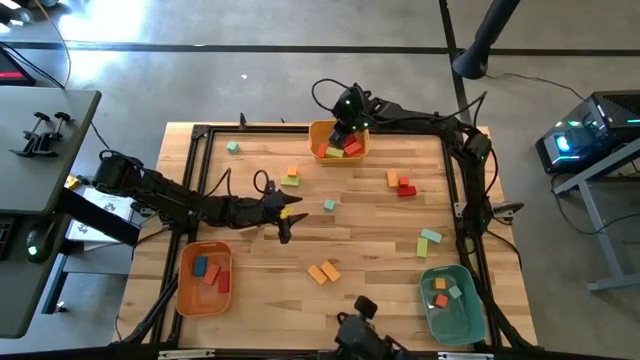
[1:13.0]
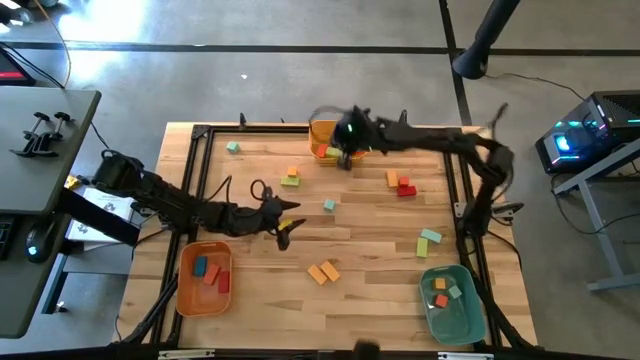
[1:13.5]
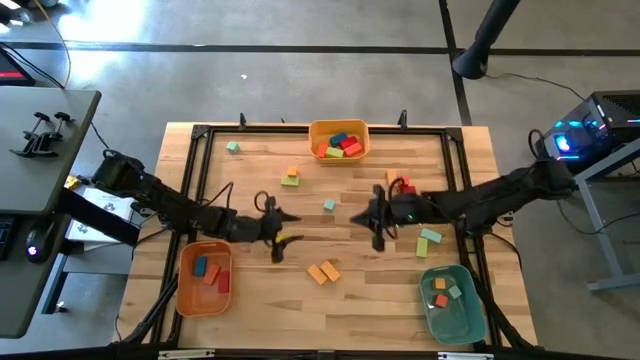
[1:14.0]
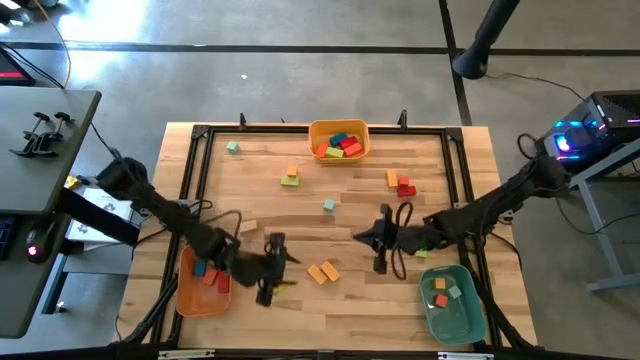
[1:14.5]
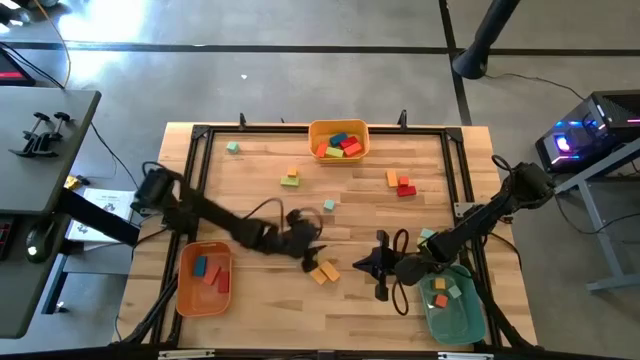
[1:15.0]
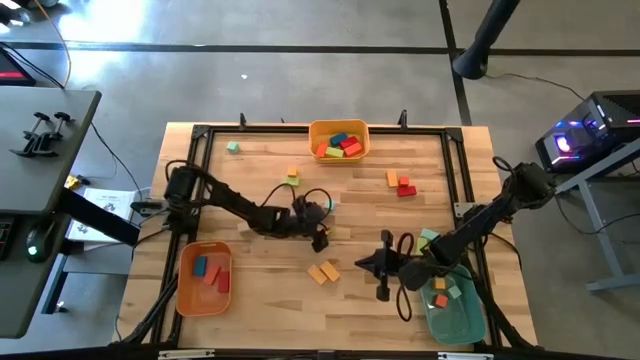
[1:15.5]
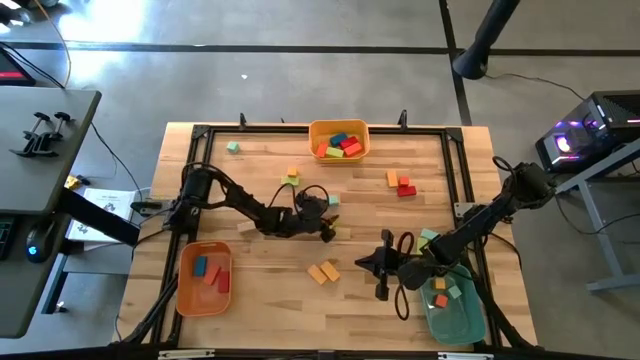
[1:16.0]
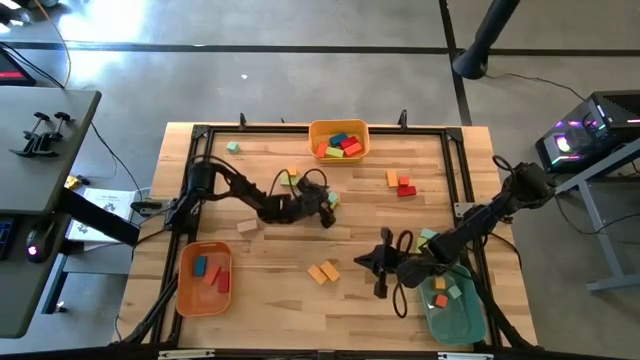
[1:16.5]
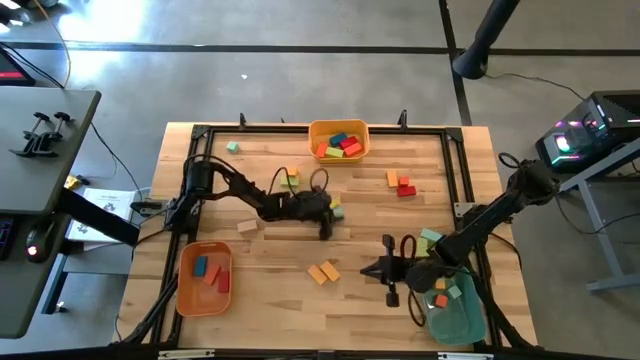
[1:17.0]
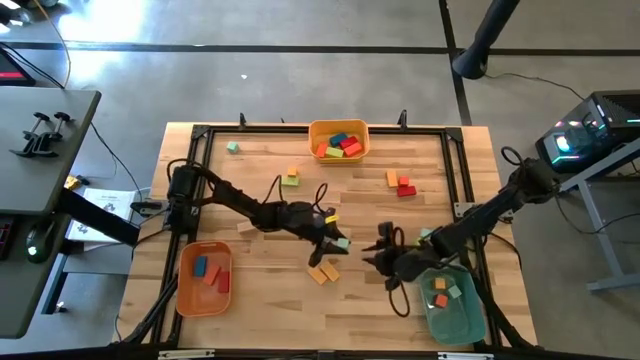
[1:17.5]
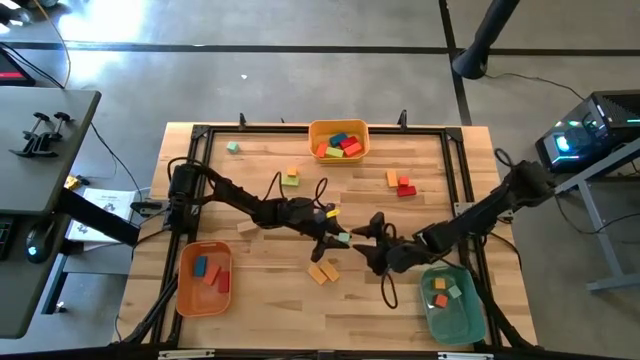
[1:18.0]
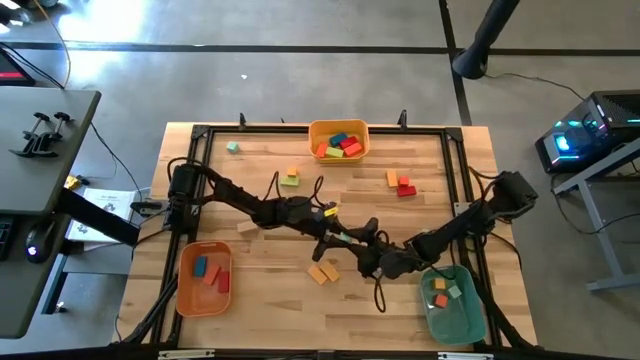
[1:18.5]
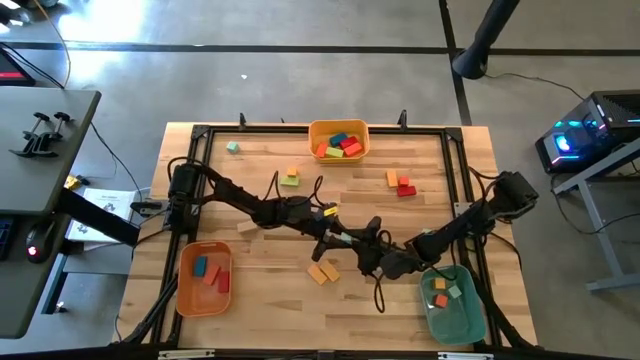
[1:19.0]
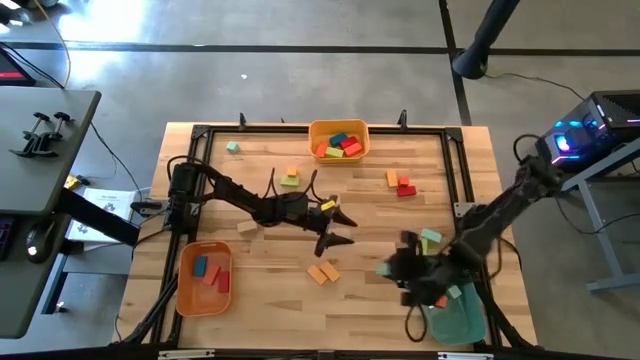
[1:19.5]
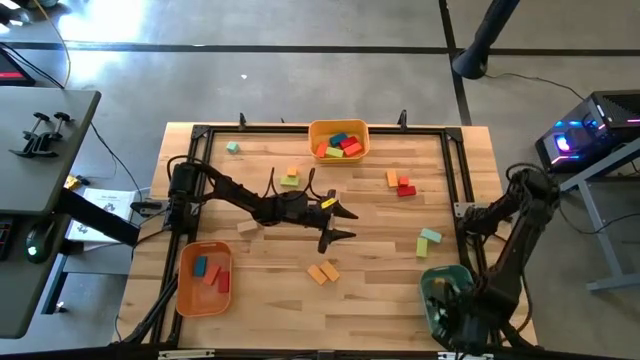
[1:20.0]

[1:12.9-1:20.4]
Task: Sort blocks by size
Put the bottom blue square block into the blue bin

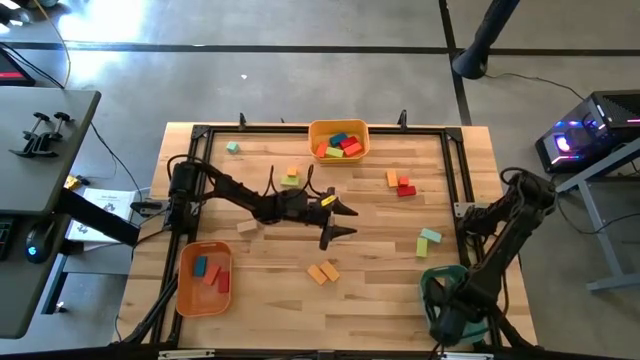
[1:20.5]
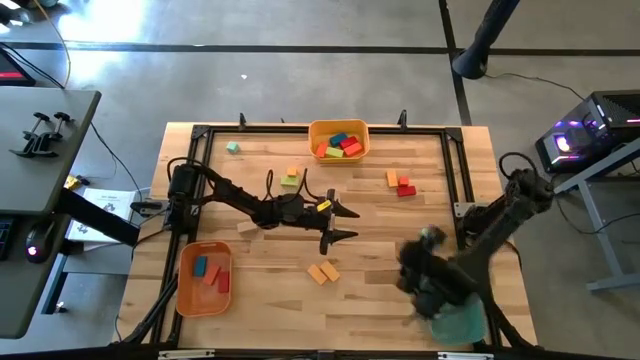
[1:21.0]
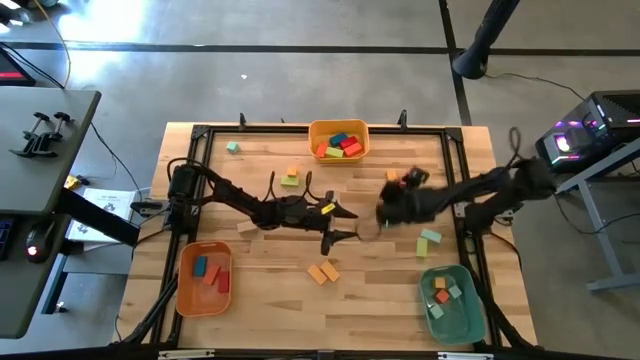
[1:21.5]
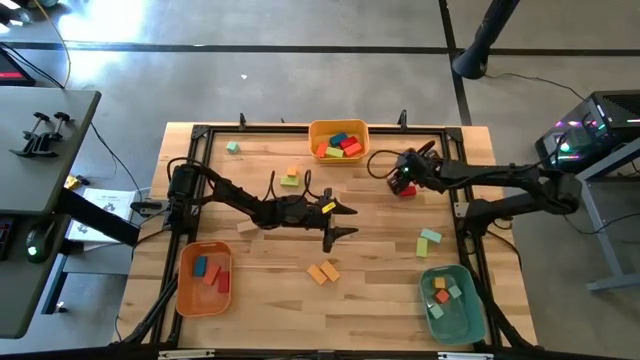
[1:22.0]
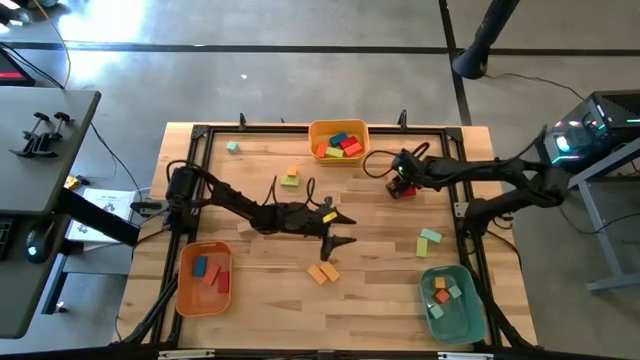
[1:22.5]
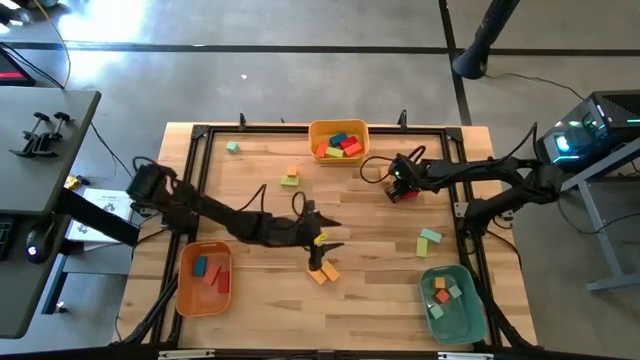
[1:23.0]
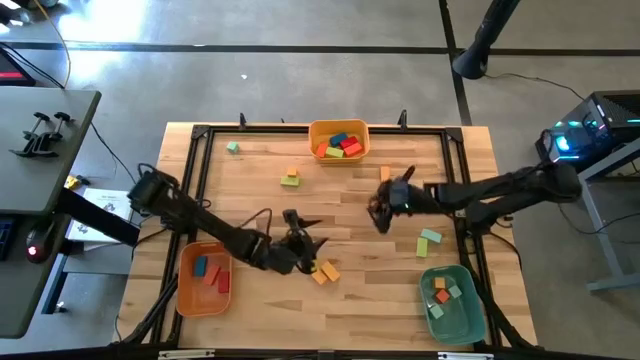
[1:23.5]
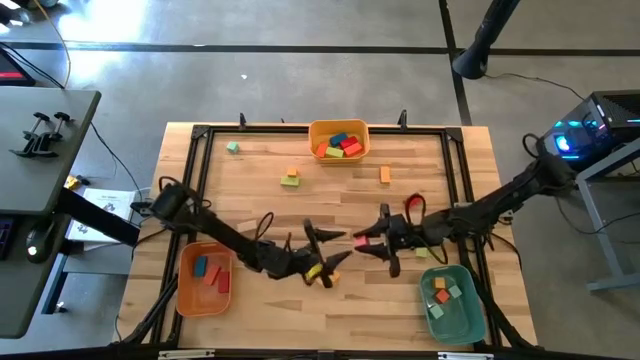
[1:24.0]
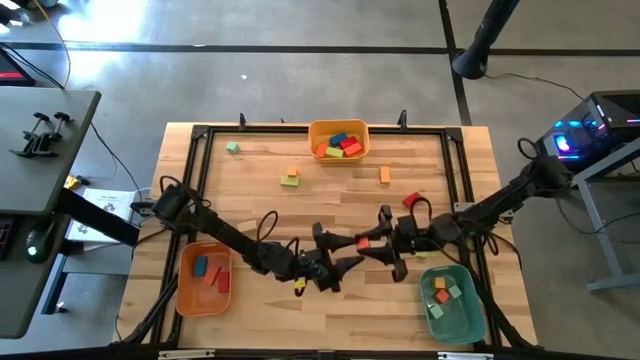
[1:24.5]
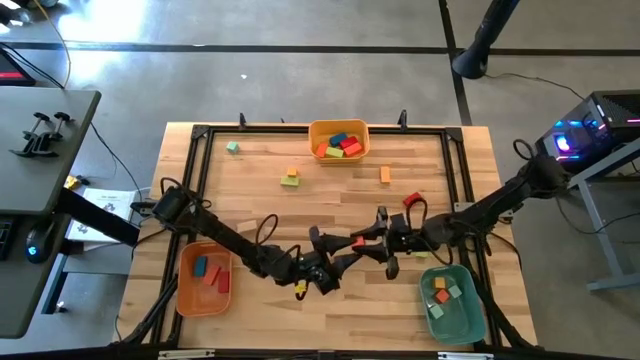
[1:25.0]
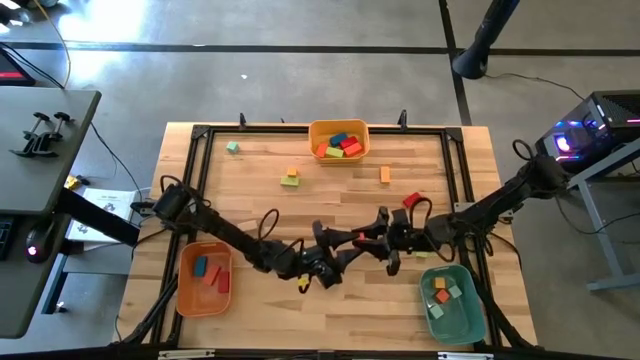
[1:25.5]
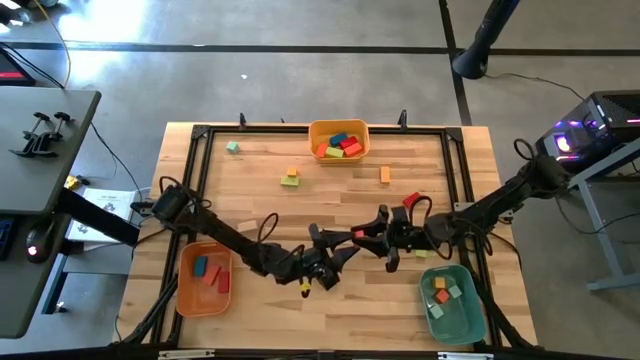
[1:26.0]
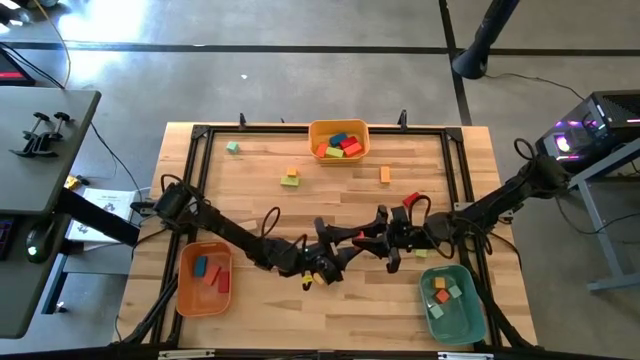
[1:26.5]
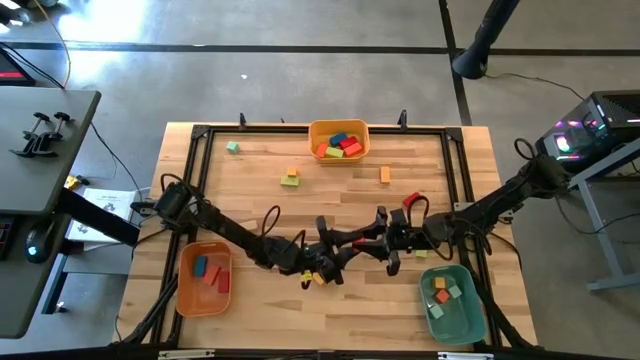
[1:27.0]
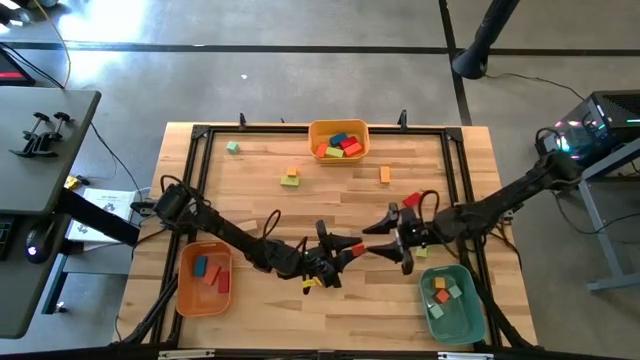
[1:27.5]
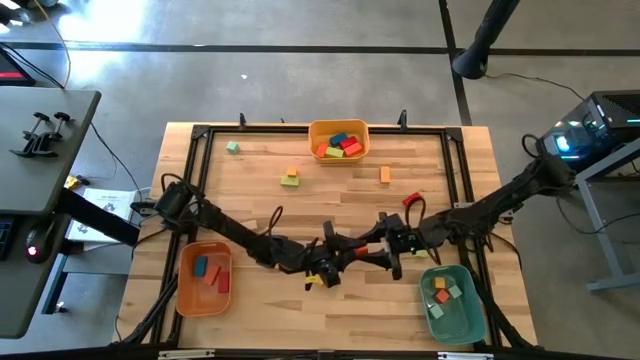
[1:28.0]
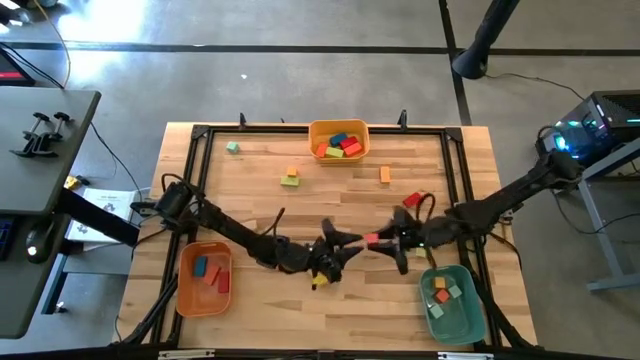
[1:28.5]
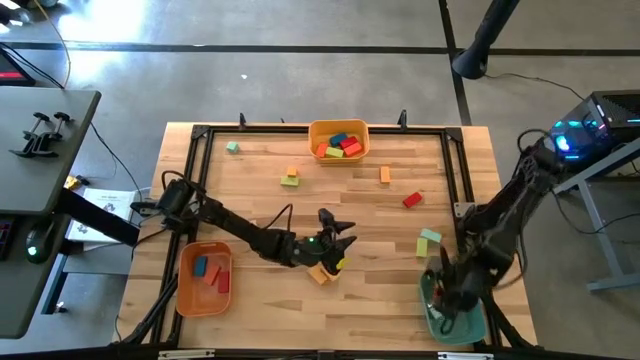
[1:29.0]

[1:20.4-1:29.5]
Put the orange square block into the blue bin

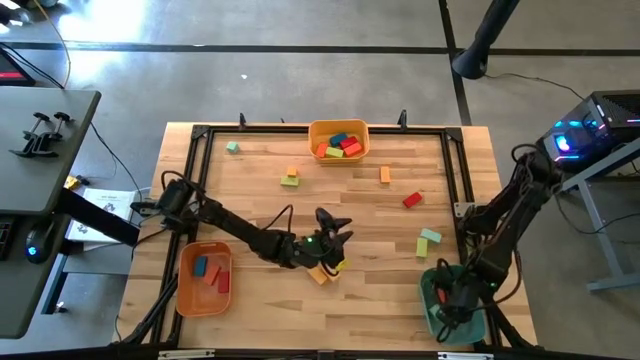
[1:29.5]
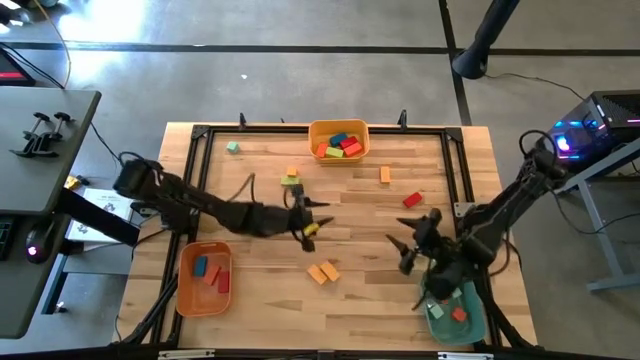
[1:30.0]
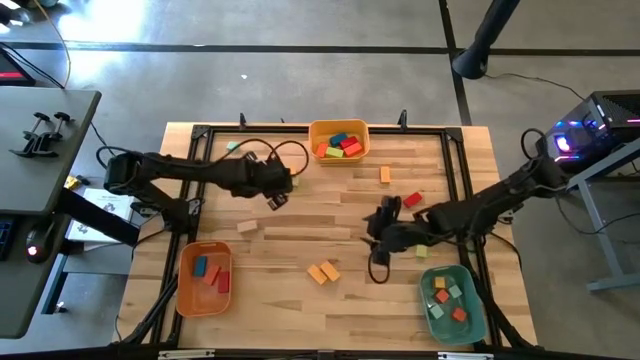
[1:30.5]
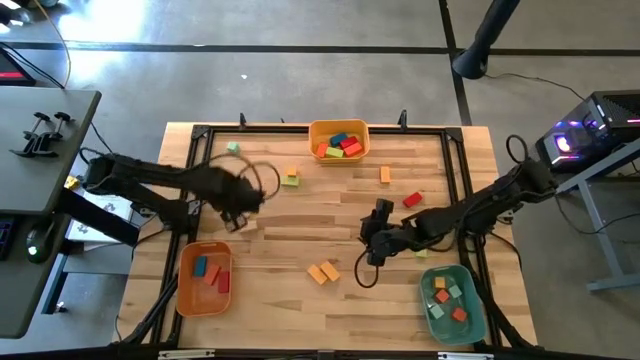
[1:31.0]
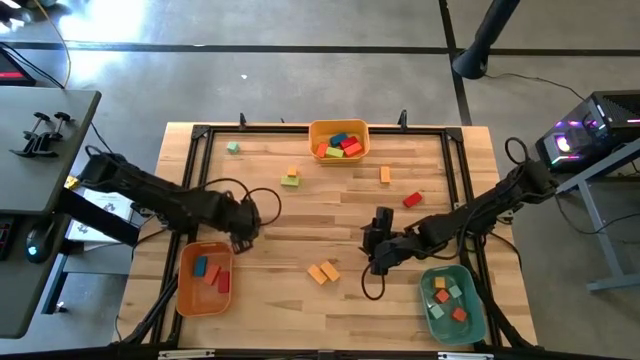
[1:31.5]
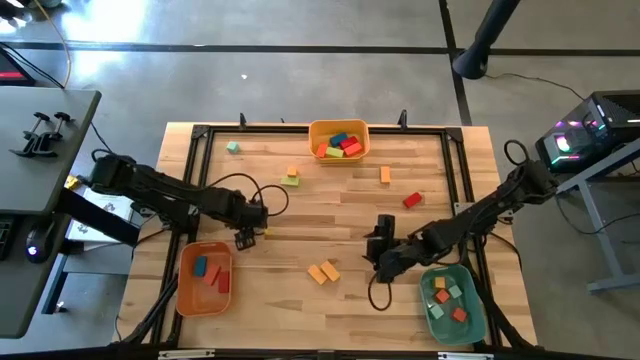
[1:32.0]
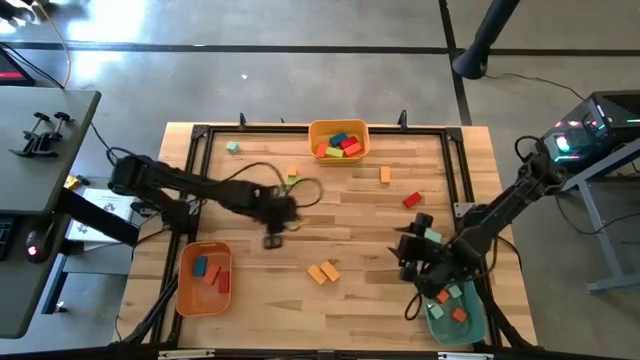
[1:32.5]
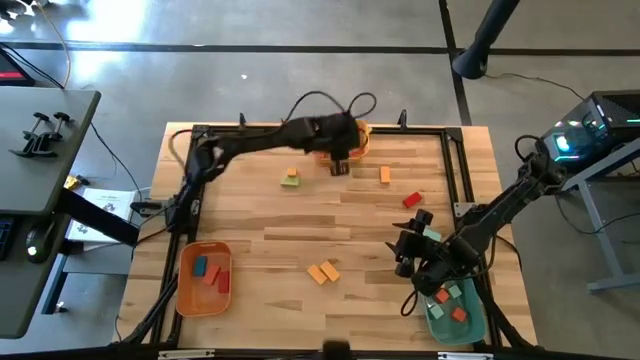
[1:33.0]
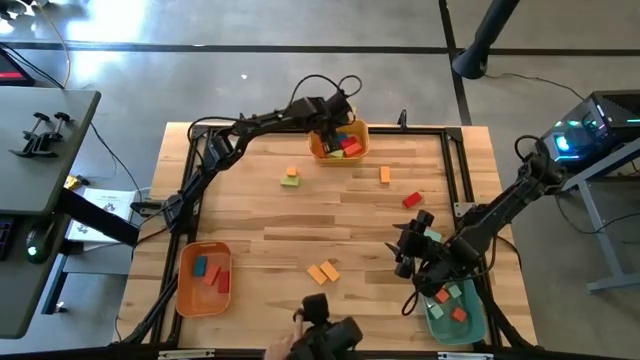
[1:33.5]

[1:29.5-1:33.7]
Put the brown wide rectangular block into the yellow bin
